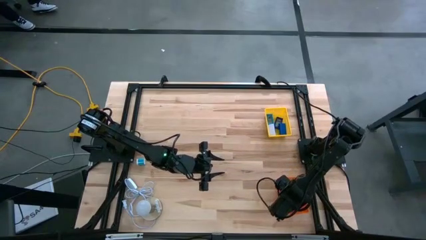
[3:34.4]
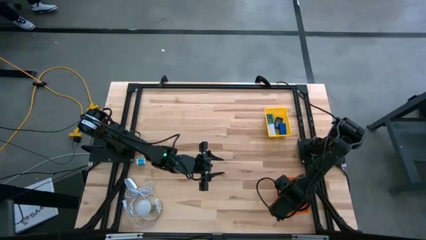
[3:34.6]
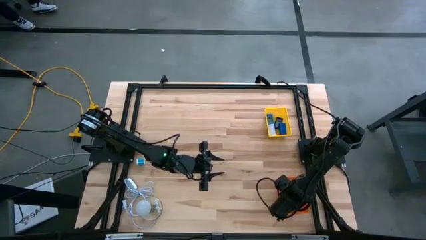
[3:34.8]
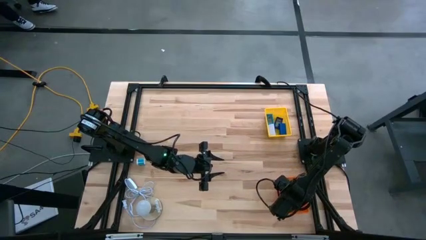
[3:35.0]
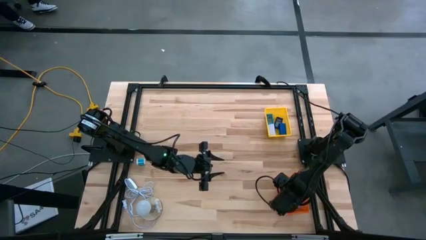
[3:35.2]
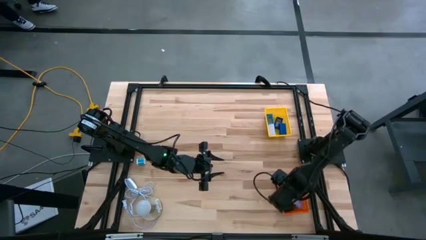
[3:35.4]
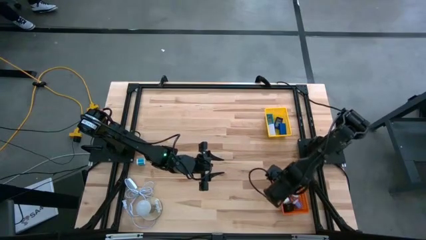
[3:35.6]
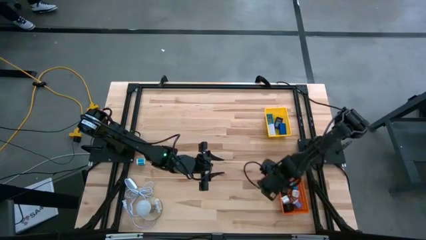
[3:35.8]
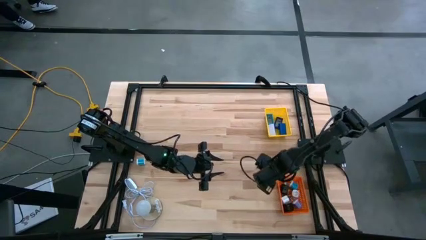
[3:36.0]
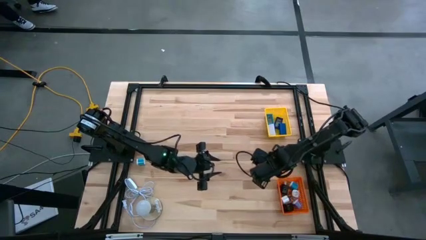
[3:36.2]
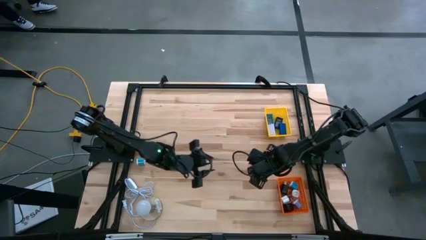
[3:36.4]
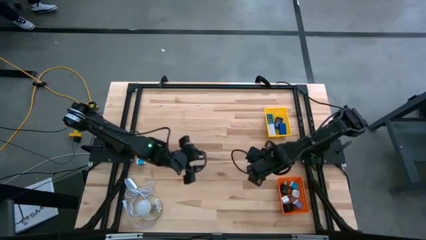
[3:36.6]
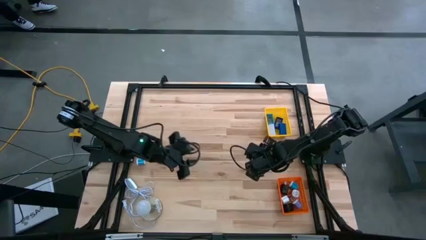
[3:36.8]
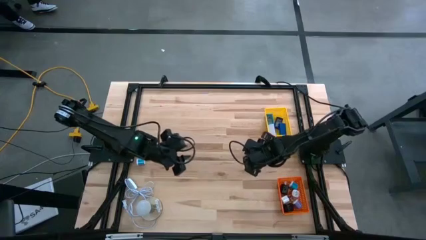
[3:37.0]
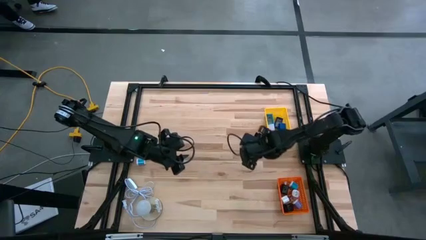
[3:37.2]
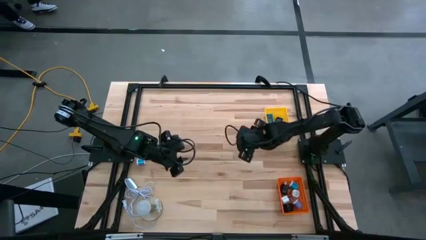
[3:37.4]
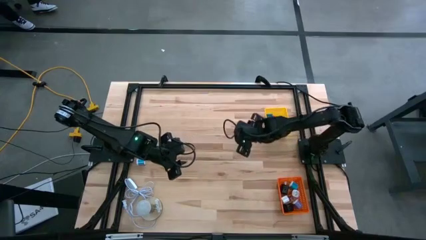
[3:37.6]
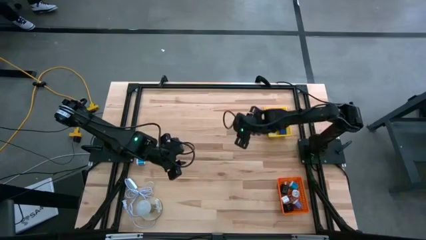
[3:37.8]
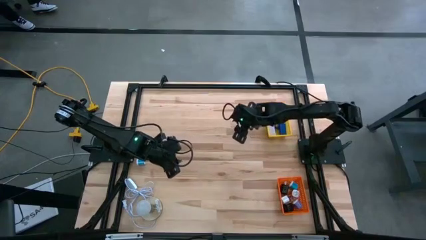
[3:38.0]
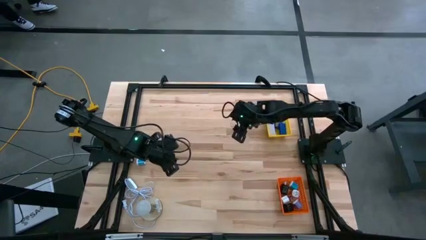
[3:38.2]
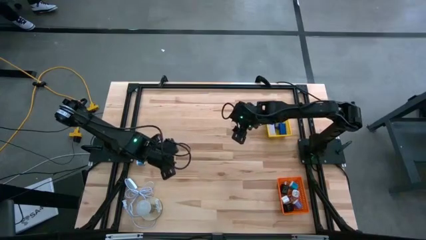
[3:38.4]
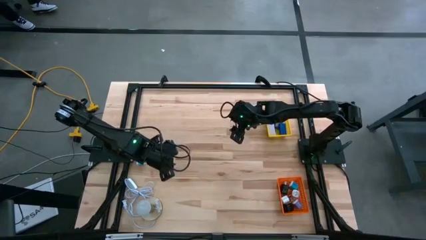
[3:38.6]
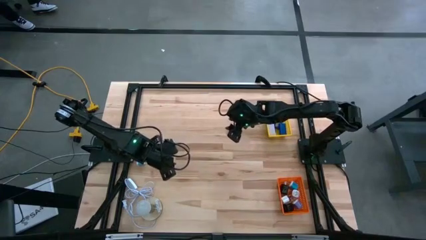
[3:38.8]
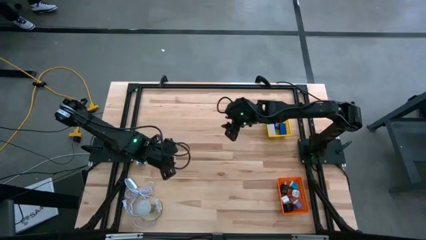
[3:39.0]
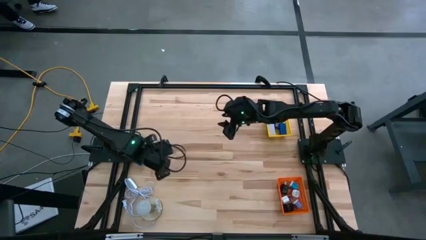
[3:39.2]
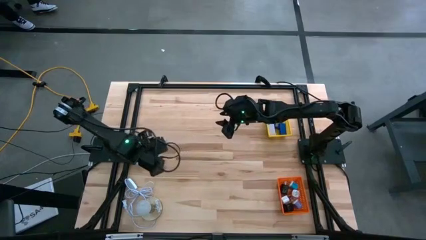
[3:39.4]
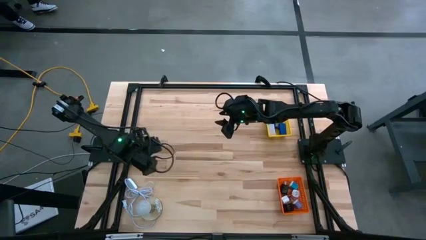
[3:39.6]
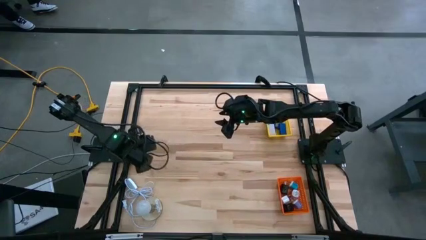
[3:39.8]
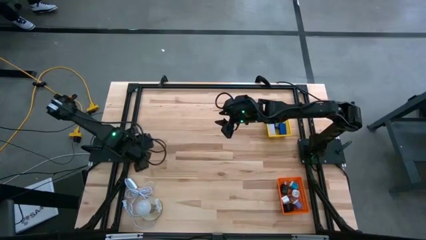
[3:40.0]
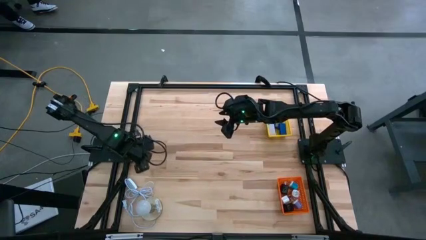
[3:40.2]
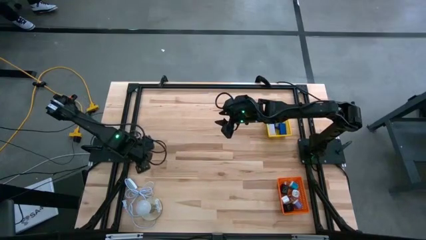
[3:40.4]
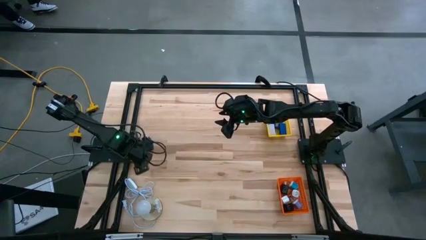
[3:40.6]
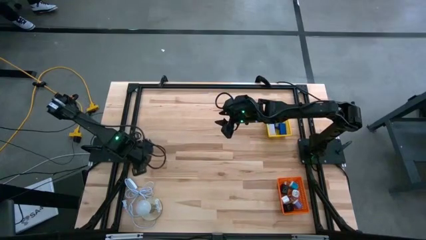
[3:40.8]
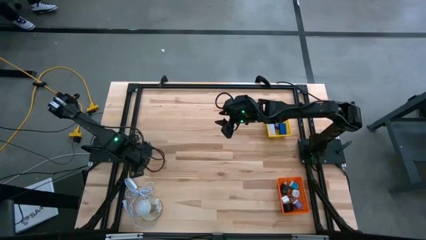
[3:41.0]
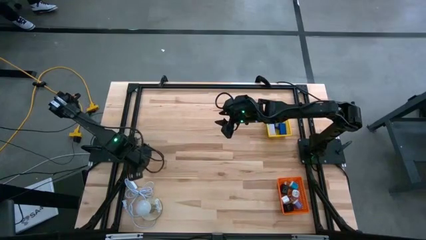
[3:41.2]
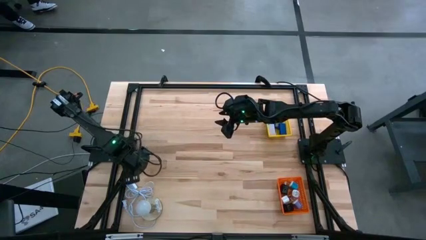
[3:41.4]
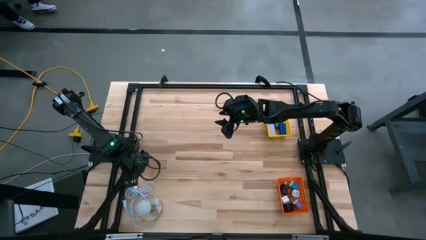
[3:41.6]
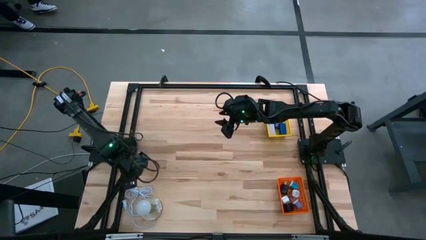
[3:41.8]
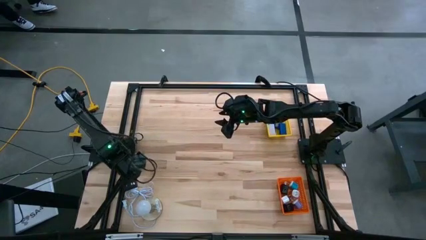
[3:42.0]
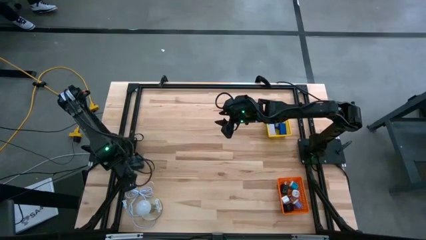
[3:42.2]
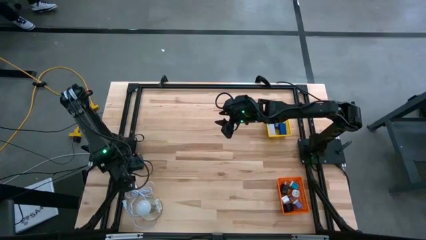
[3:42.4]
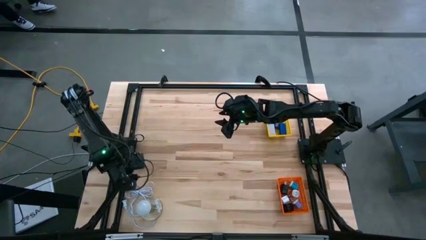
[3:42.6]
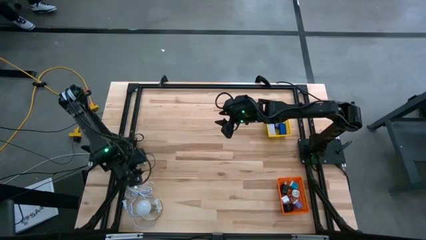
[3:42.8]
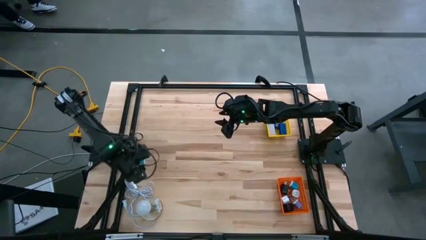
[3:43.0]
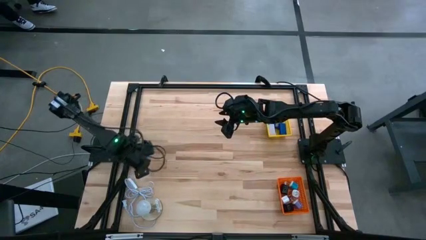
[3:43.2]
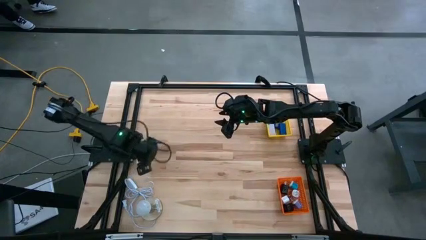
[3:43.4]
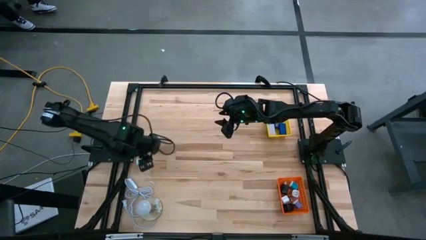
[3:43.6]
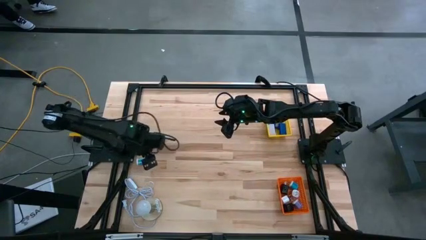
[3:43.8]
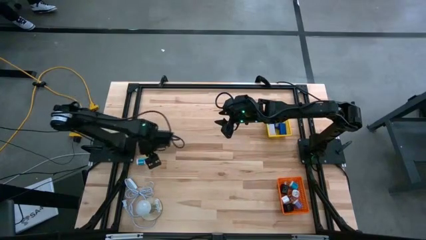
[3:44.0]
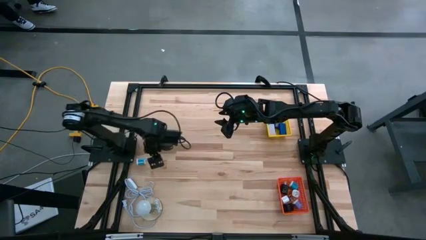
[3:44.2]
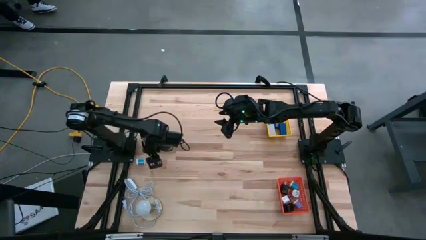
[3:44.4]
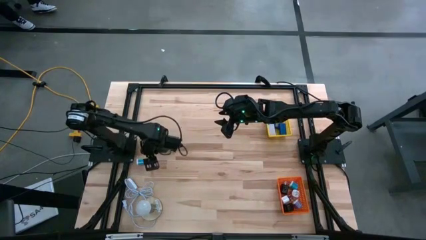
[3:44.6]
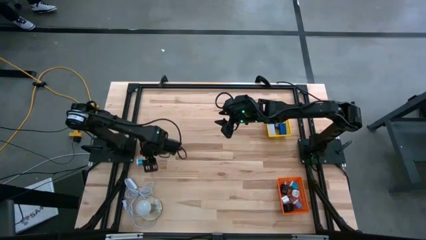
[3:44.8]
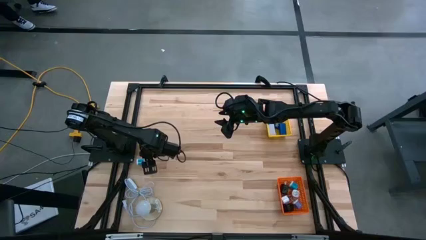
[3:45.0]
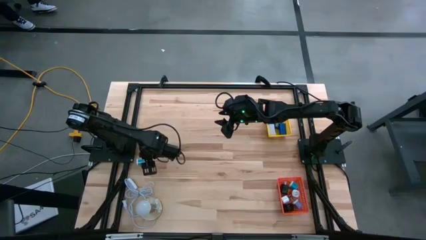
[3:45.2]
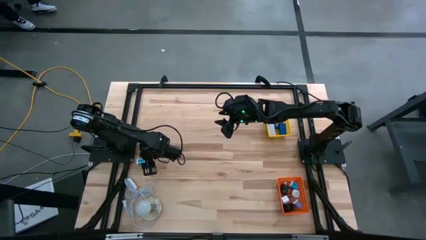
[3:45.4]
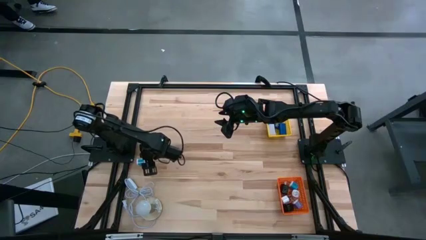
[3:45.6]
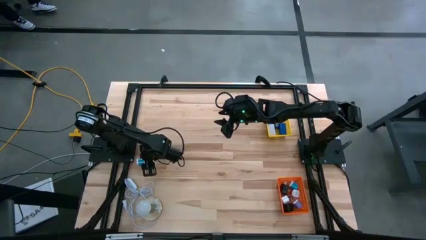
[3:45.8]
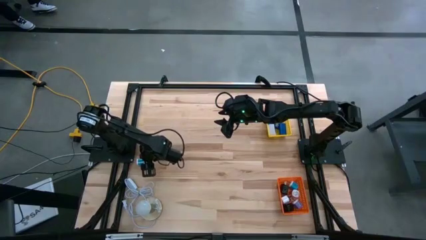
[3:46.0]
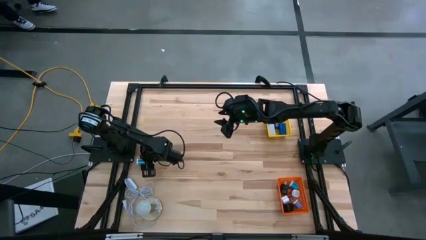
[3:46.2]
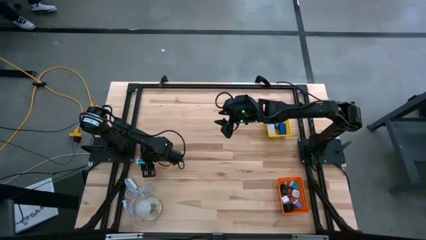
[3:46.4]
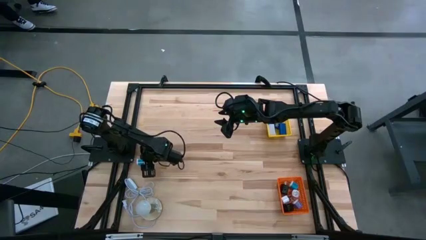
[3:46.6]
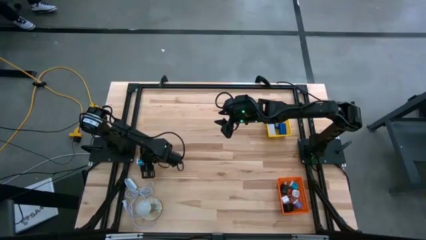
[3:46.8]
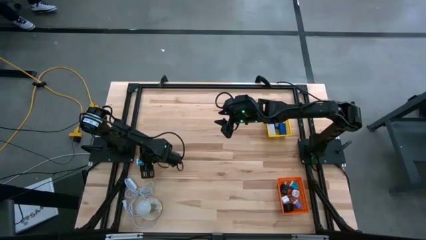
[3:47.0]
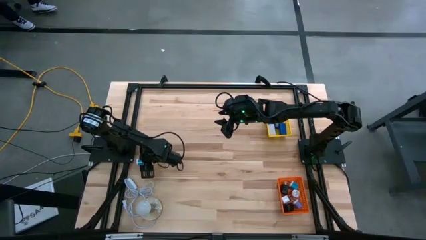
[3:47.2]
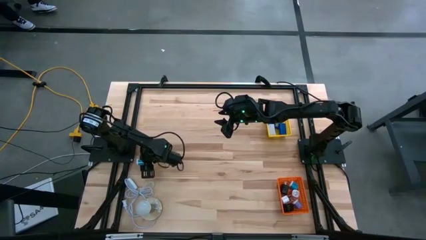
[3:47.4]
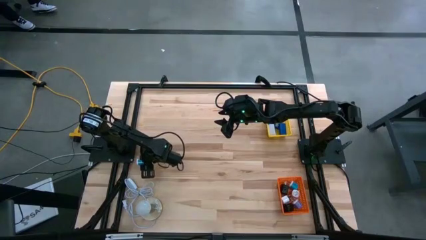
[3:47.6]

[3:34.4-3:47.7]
Task: Pick & Place Office items
Put the light blue charger adapter into the orange bin

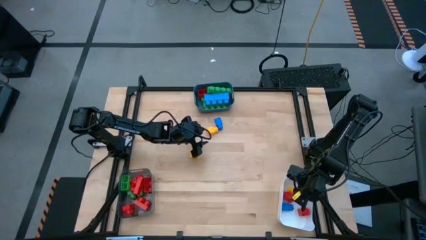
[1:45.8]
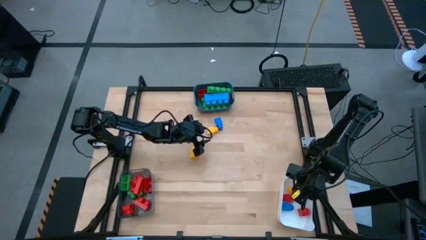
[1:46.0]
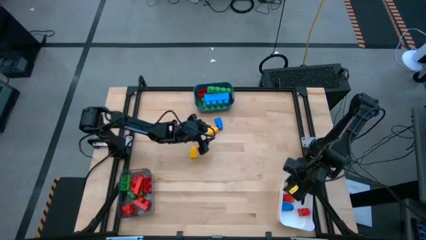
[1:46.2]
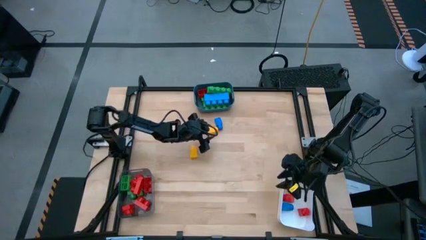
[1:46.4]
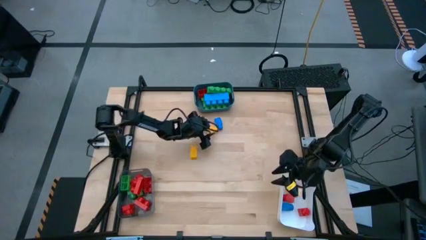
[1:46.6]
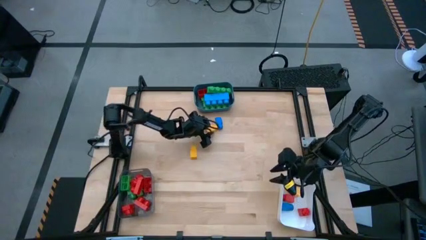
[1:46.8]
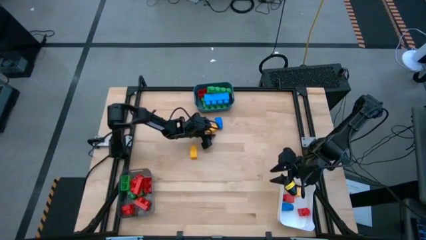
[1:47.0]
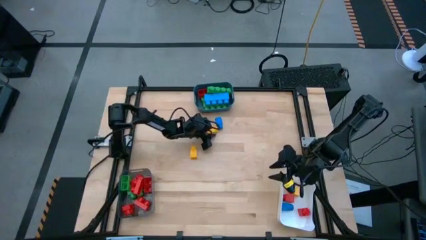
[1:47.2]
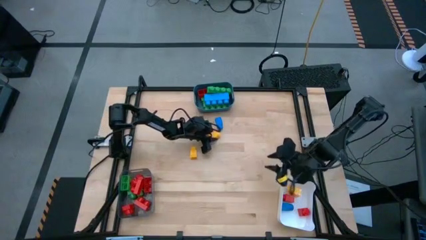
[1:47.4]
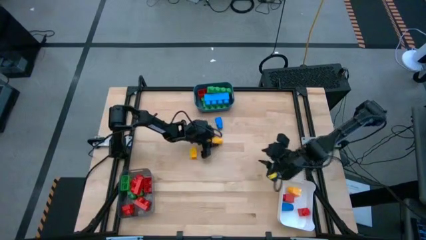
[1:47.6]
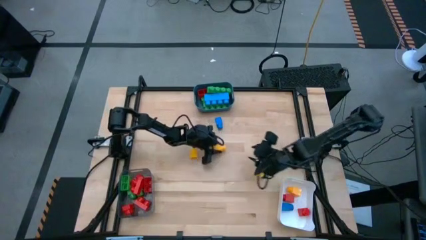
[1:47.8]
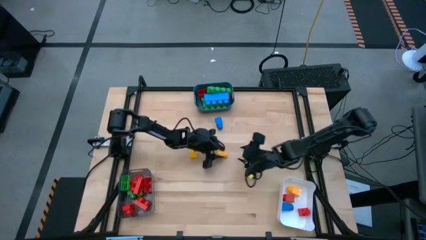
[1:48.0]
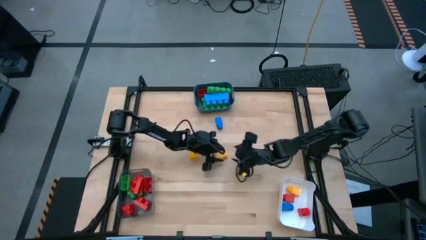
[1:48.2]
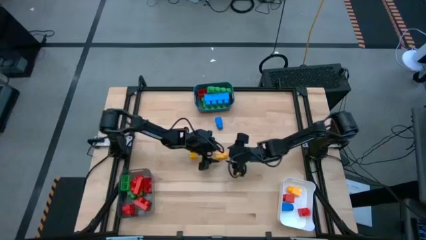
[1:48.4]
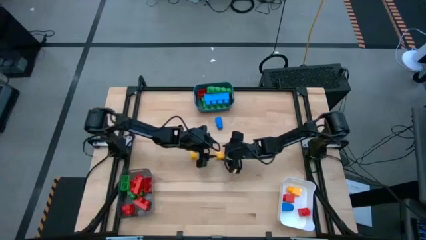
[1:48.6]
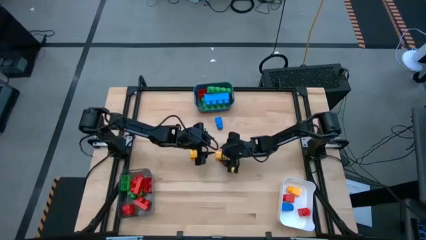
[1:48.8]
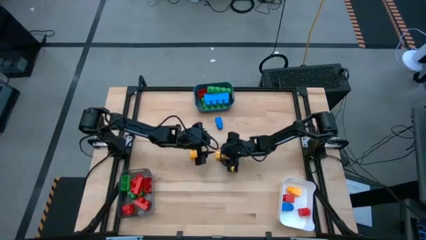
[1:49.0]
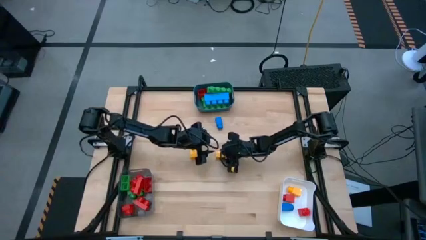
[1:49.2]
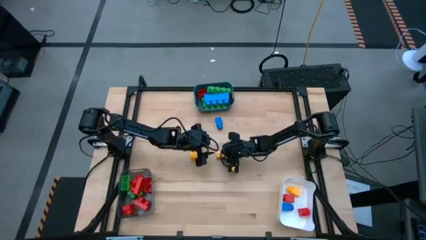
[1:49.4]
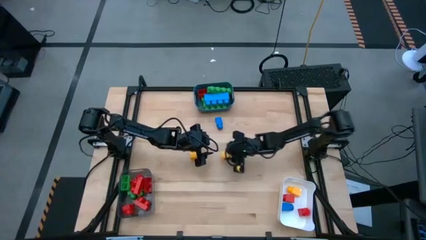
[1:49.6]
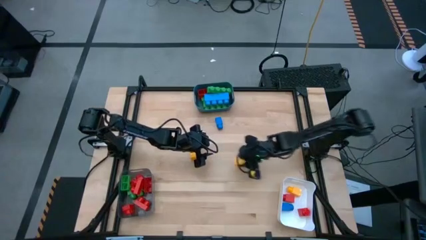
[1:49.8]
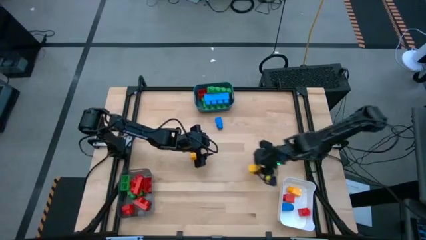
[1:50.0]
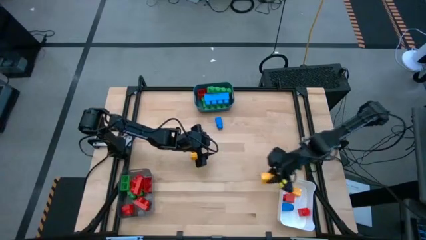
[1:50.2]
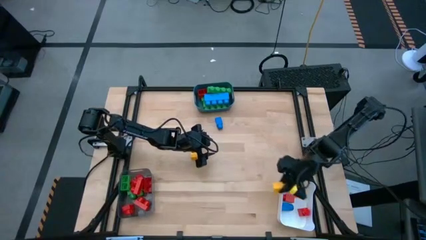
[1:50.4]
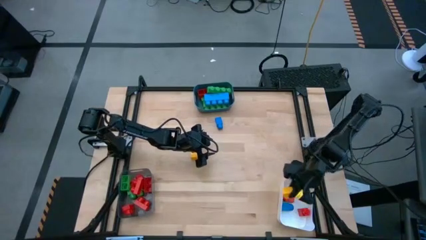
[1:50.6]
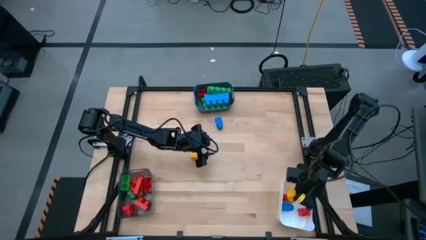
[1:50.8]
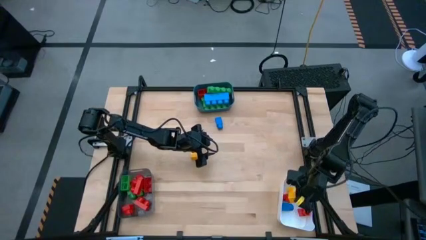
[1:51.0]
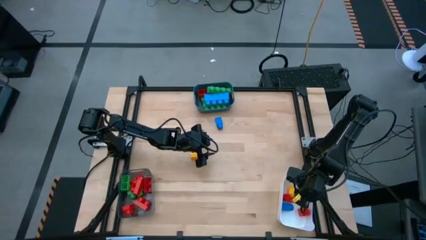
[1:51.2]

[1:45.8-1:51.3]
Task: Sort blocks by size
Put the yellow game piece into the white container
